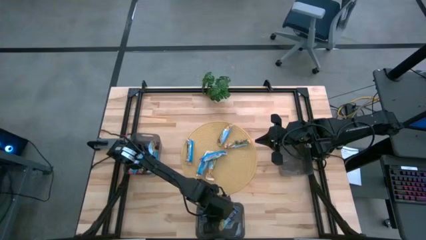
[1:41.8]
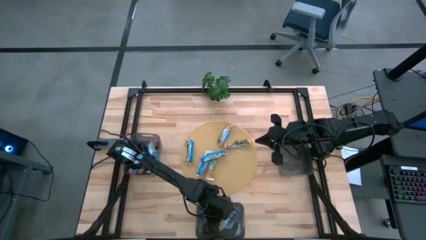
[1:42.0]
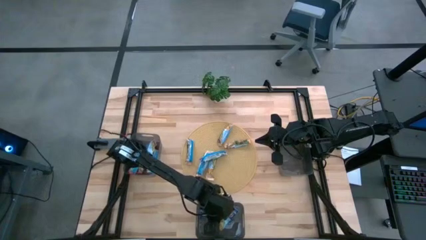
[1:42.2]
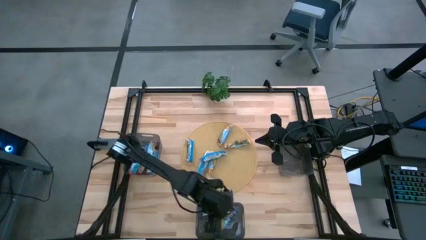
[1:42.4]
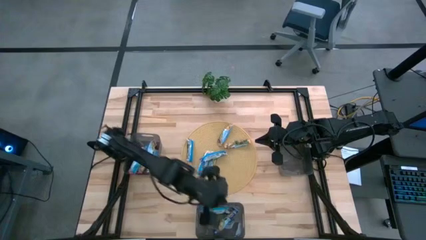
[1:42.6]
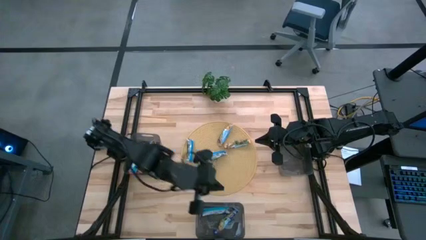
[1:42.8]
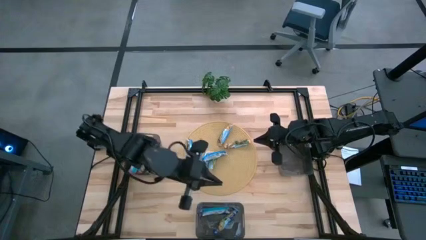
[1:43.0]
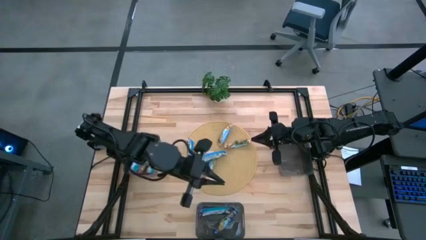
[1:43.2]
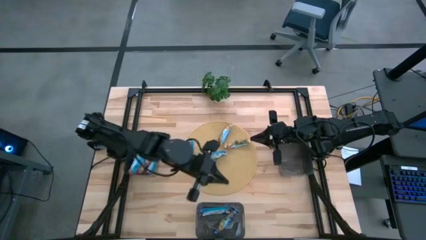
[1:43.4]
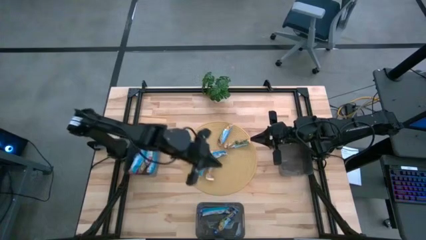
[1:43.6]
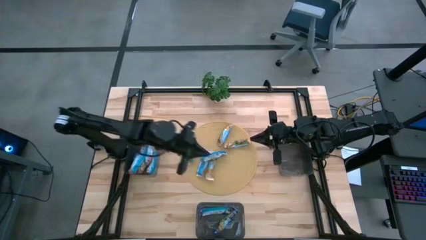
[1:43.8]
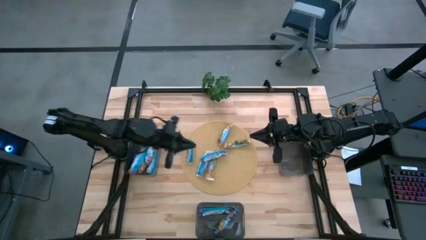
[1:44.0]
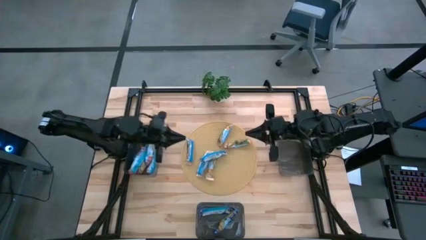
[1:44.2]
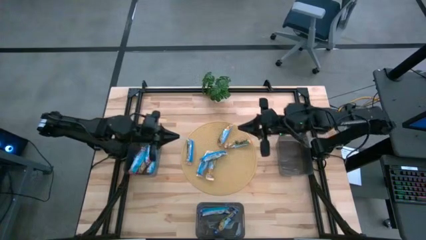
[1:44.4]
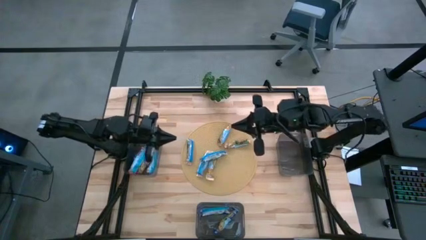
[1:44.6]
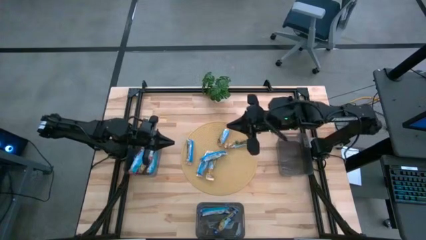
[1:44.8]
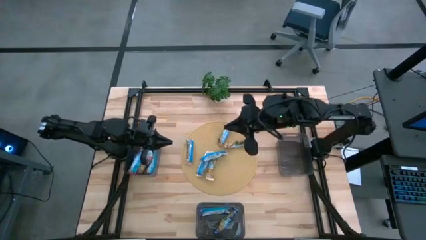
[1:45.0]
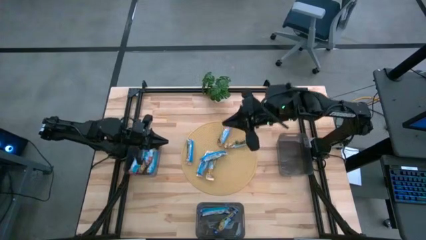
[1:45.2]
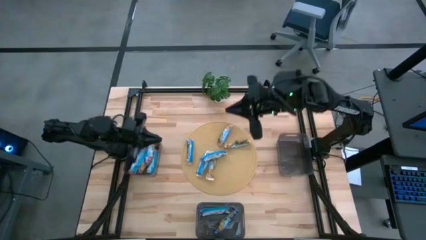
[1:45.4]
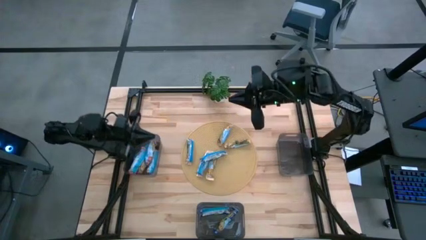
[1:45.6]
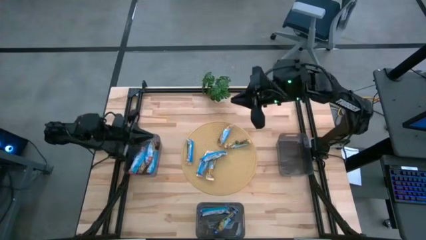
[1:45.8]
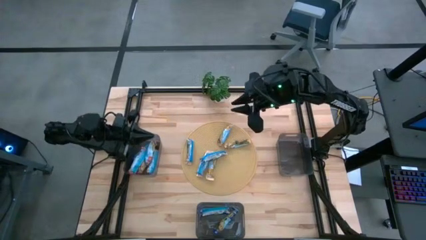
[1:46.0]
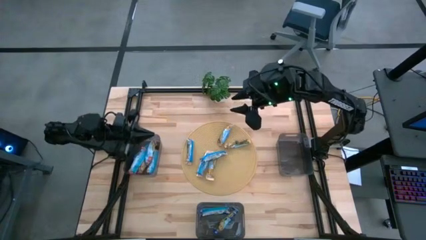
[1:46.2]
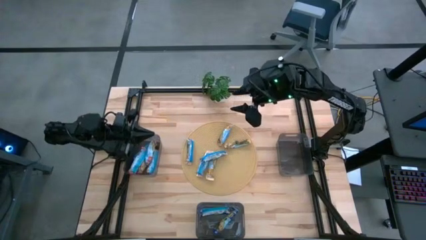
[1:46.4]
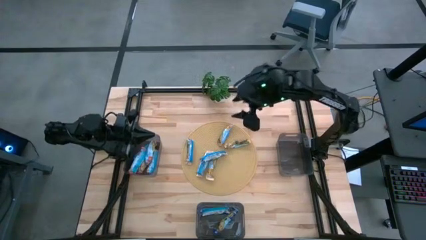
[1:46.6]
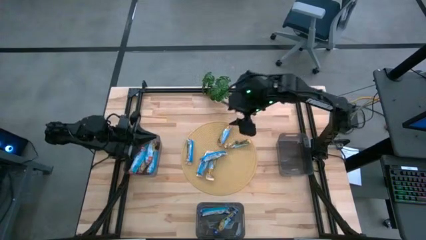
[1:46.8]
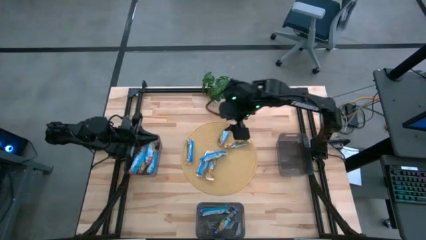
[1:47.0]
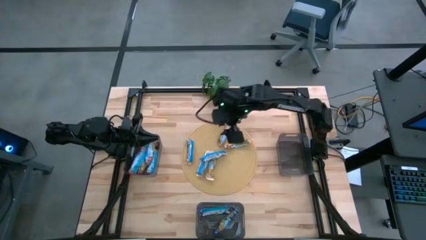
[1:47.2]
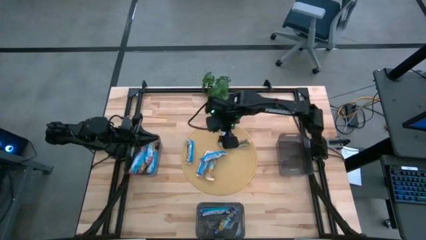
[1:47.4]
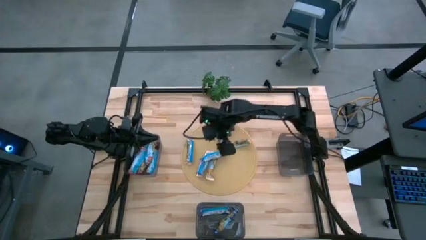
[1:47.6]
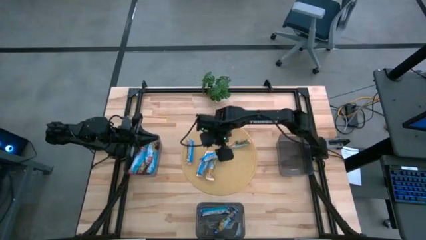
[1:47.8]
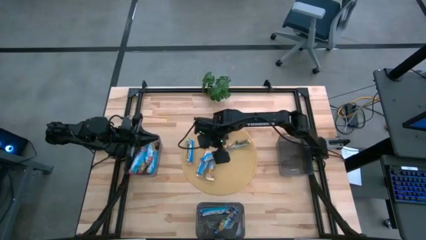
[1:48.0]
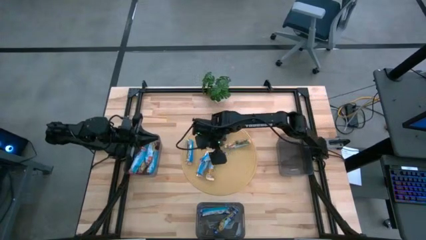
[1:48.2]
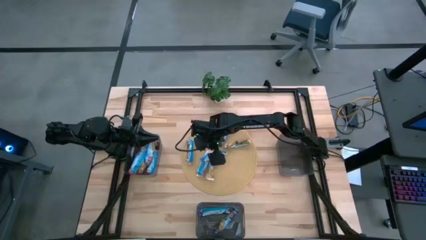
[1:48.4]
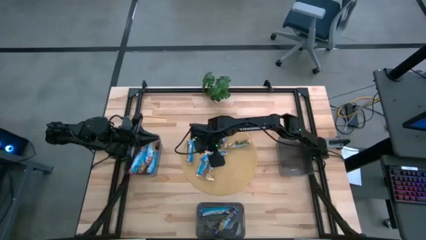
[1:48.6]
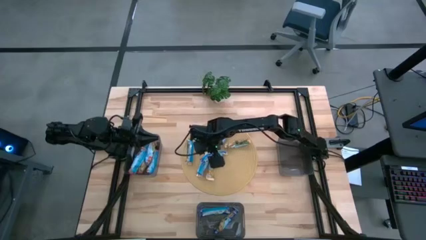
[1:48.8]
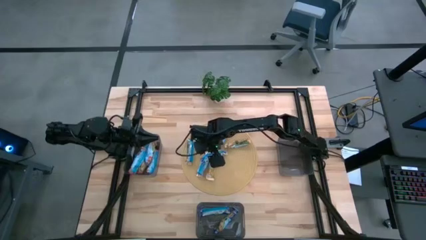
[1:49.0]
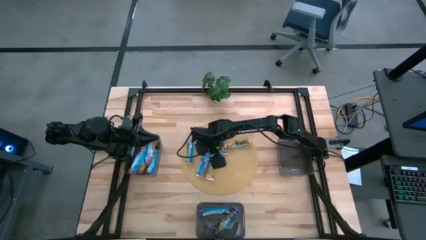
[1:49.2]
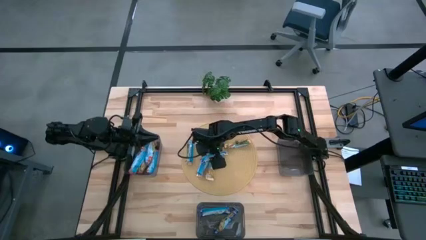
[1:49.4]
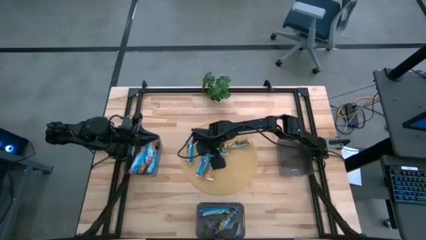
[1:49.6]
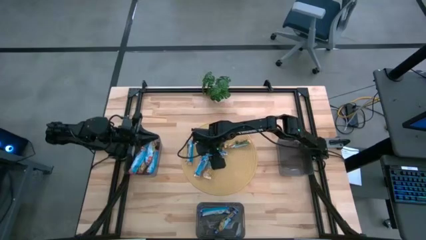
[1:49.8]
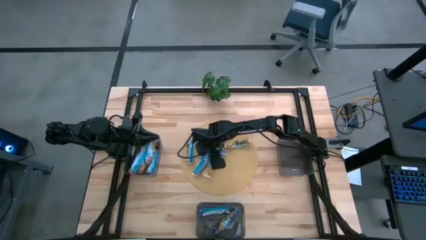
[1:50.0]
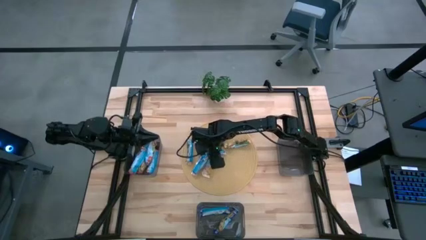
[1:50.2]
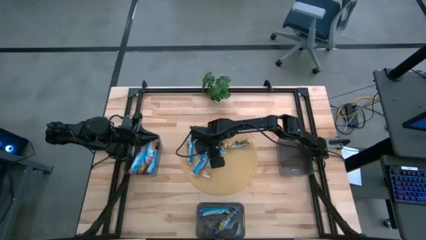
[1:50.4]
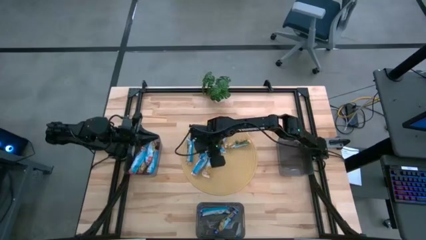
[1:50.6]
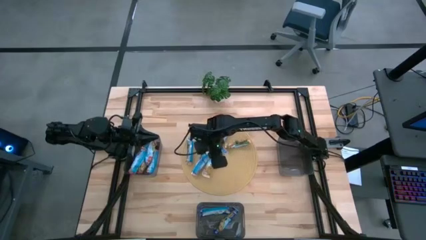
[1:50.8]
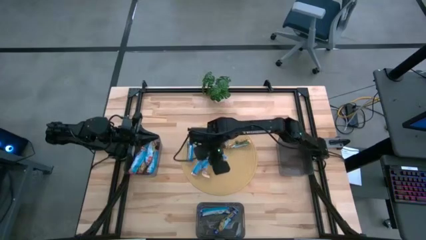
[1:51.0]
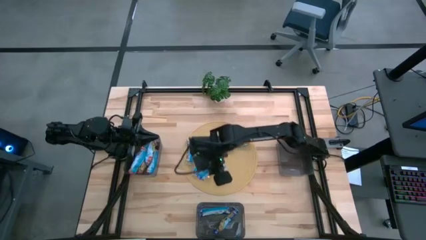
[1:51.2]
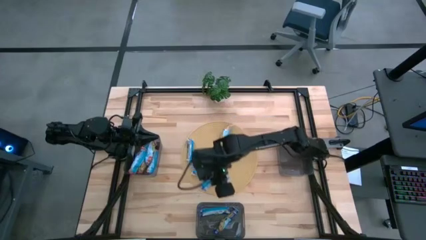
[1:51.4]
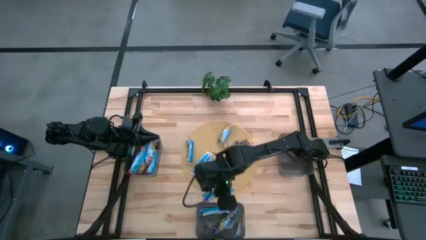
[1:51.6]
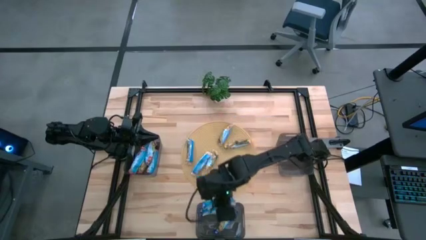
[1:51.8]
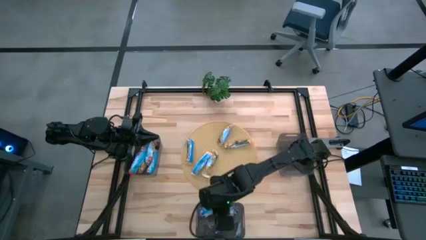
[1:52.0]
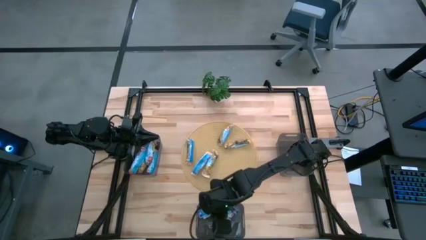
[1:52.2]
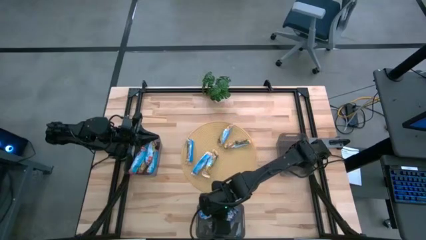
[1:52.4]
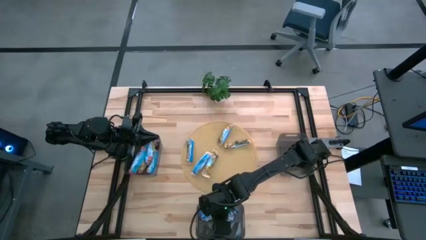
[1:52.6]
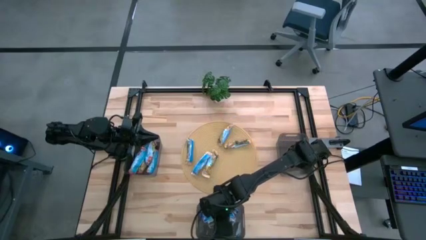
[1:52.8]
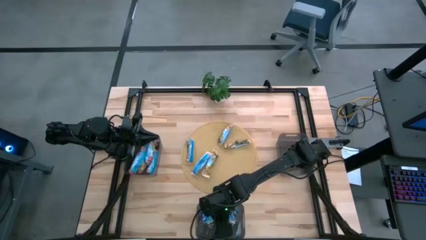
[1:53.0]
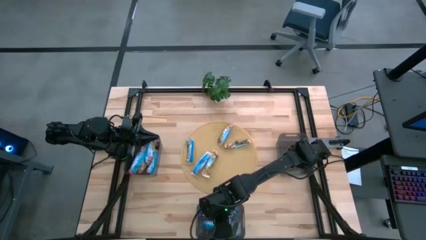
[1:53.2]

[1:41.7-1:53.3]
Task: Pick and place Granola Bars by type
Put the blue granola bar into the bottom bin
